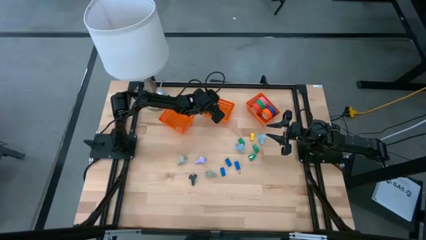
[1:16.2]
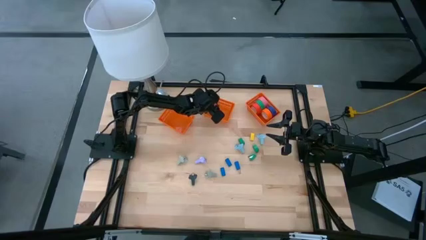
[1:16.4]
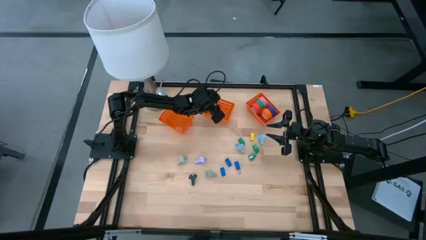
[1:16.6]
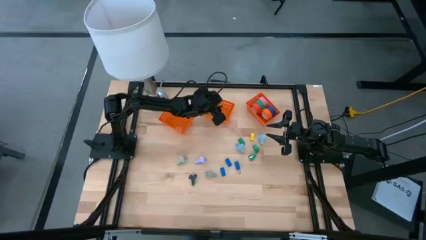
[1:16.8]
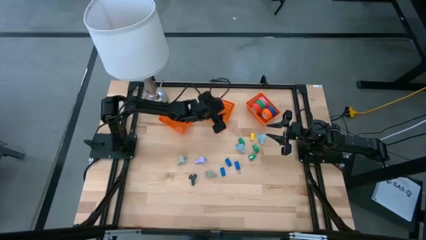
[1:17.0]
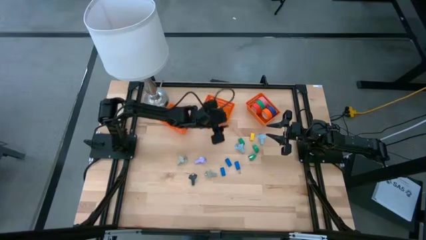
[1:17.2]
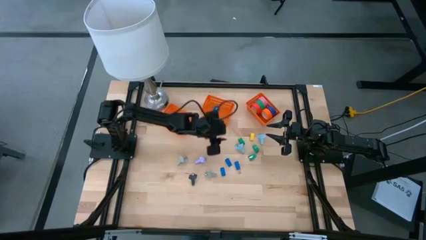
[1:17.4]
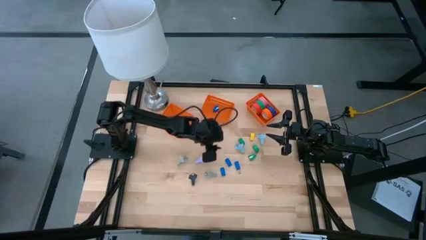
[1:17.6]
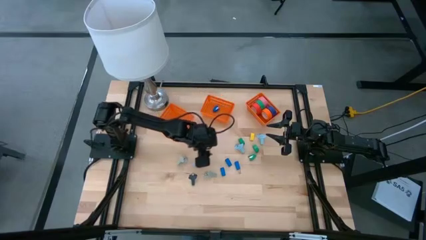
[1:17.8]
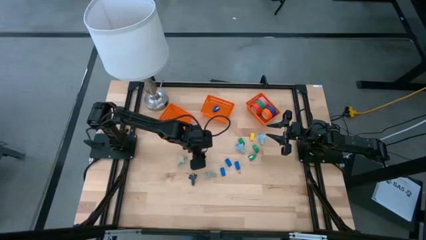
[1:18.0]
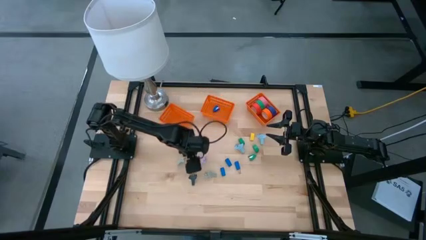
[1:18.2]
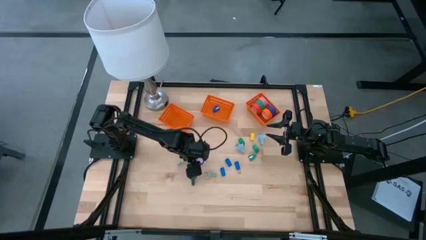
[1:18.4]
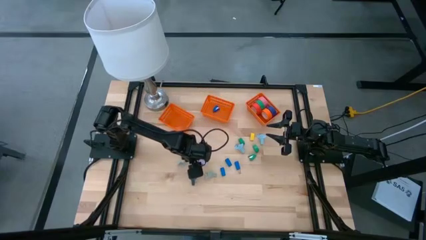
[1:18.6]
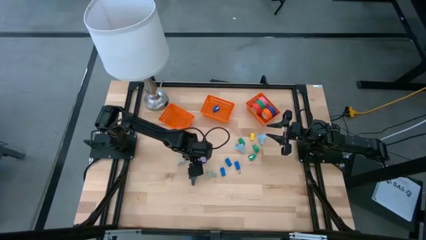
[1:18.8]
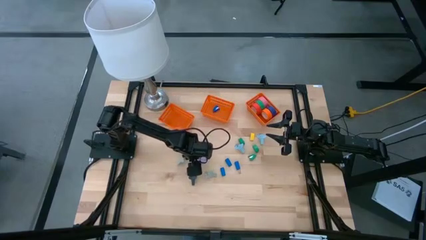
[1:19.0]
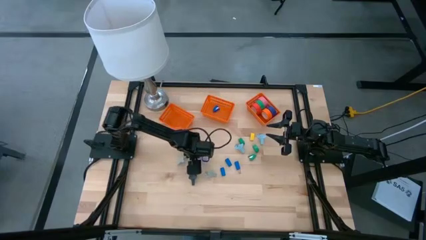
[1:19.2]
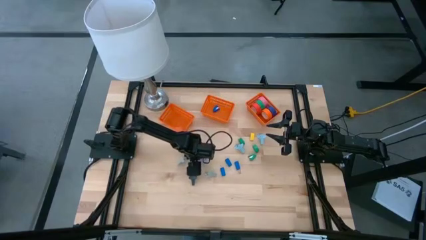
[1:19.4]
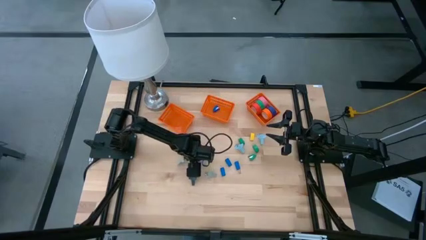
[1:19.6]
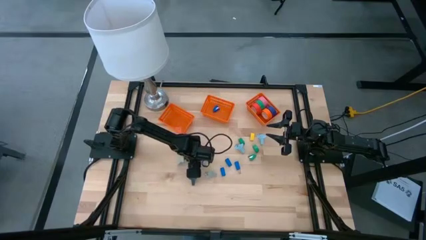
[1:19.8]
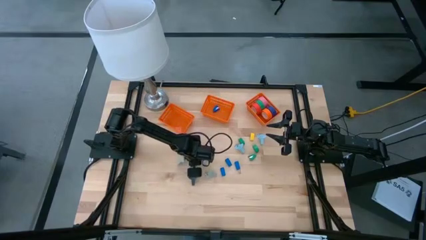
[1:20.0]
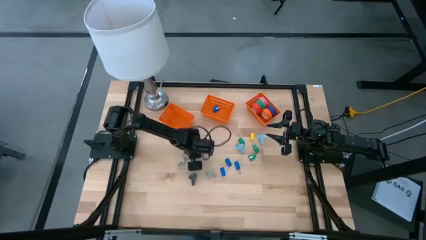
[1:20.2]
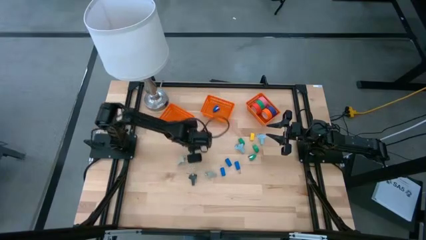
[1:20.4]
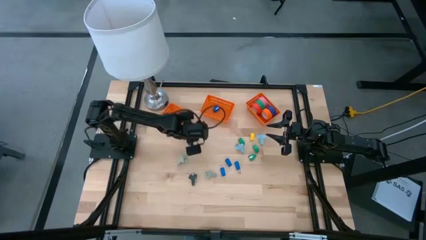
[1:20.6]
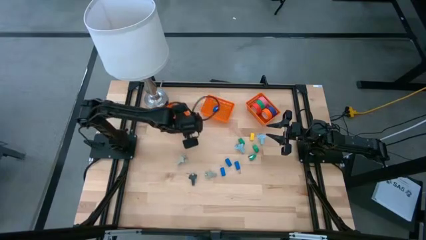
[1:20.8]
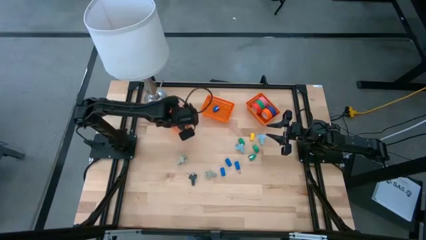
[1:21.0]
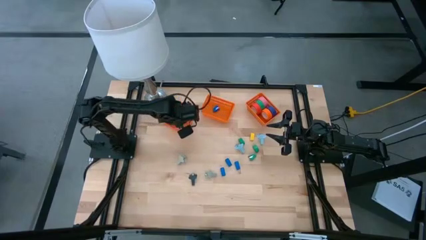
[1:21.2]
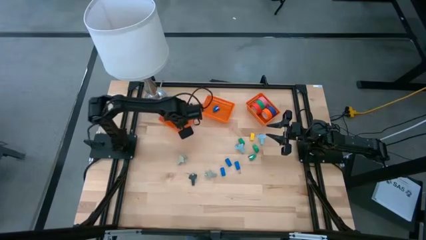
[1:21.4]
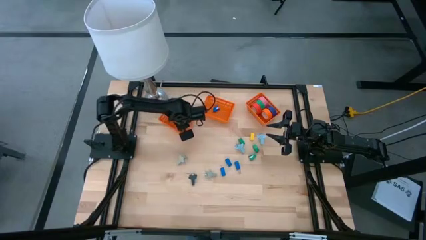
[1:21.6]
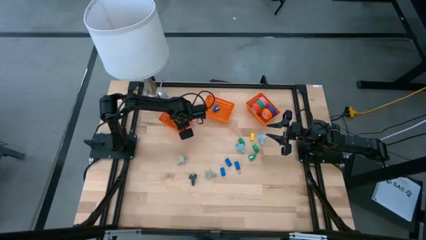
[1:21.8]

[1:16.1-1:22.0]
Task: Pick and place Stapler, Stapler remover, tape
Put the purple staple remover into the left orange bin

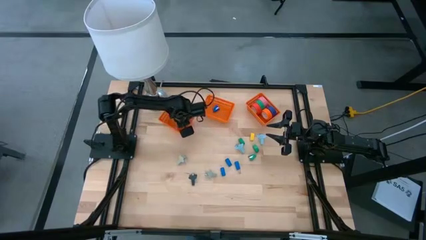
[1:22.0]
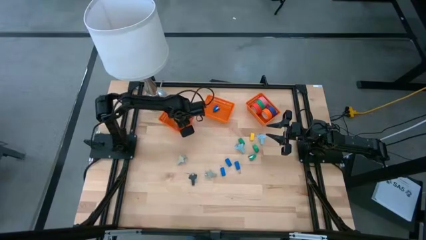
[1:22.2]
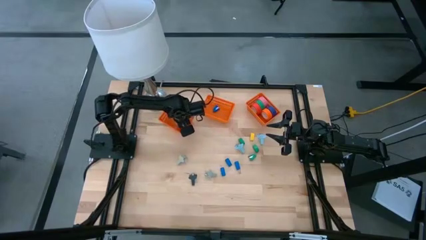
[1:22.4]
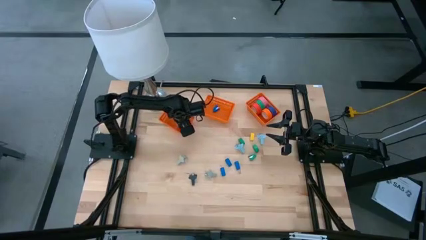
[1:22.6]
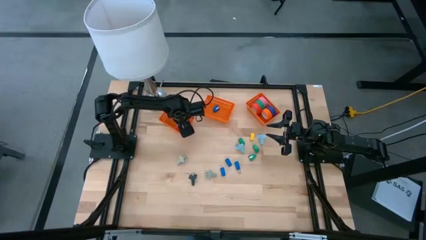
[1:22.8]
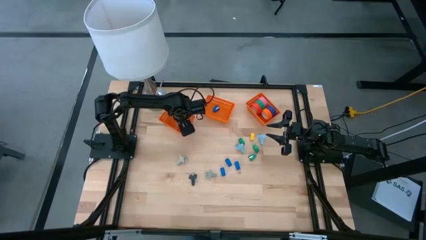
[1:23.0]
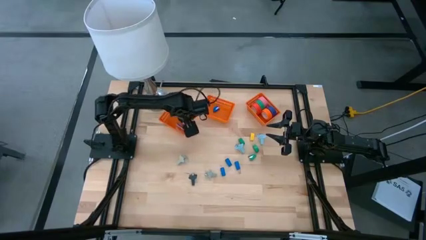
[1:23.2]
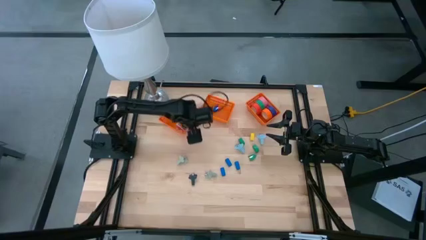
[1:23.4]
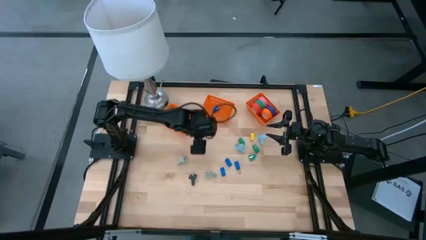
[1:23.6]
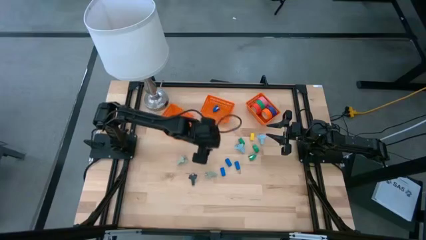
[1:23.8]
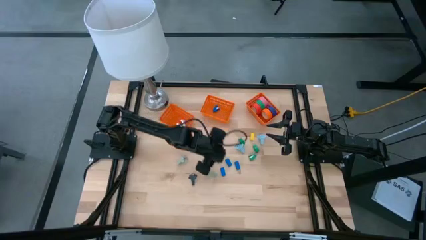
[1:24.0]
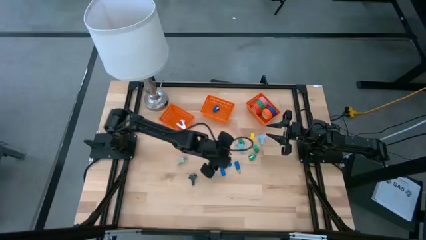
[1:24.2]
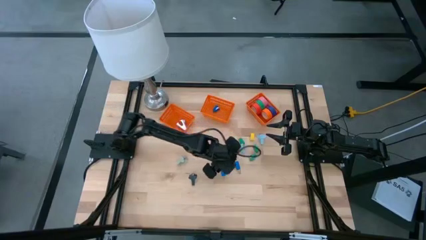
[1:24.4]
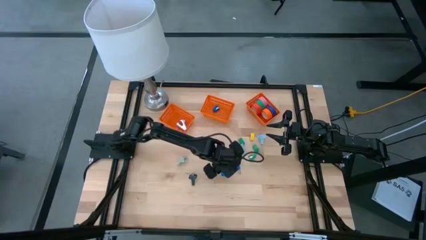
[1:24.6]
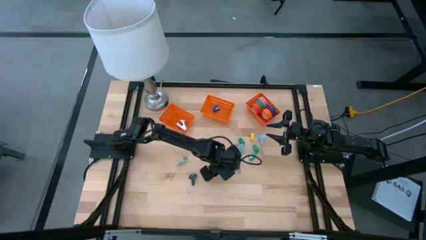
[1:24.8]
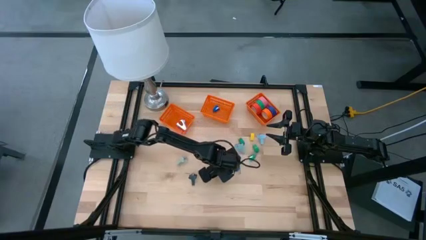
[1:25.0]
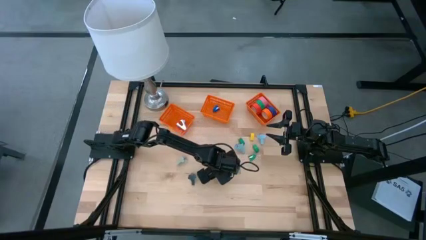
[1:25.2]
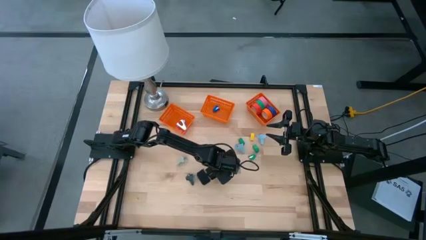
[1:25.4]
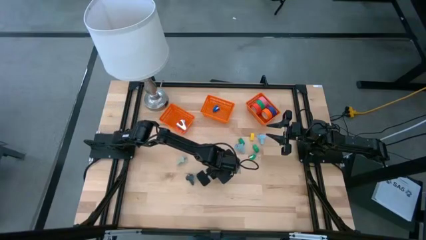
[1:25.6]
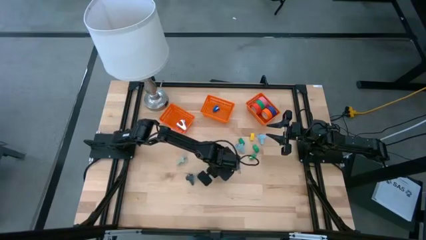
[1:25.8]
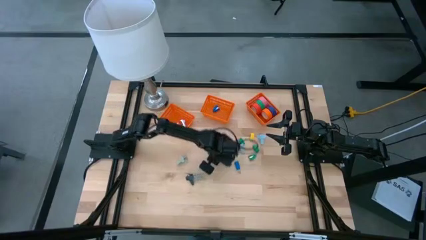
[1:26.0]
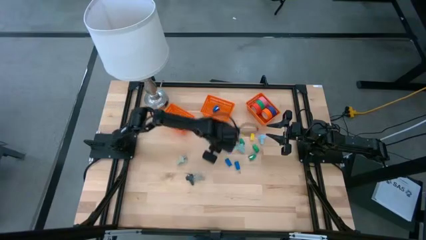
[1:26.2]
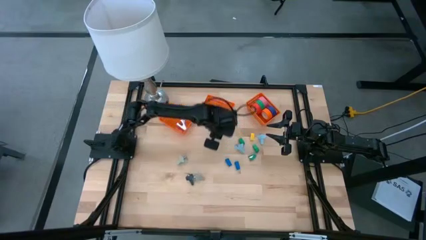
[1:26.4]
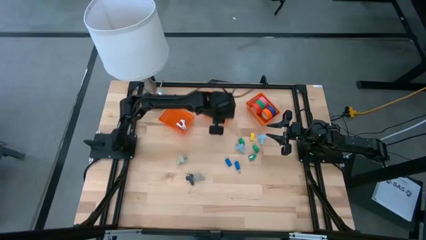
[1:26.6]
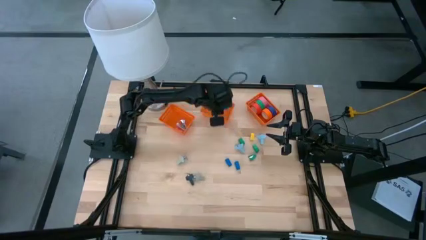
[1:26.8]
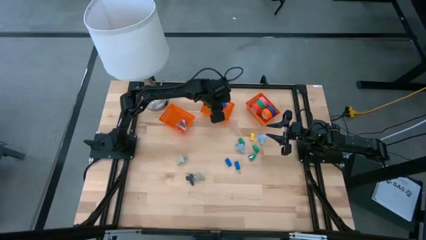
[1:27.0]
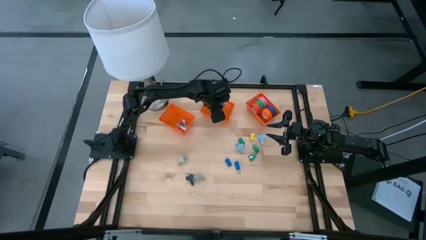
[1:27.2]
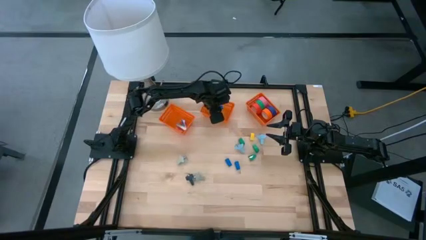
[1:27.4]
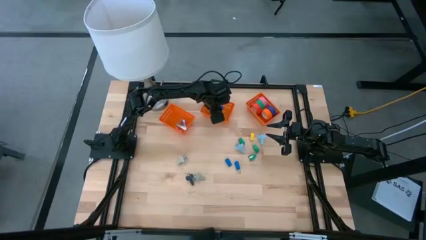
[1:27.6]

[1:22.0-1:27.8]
Put the blue stapler into the middle orange bin
